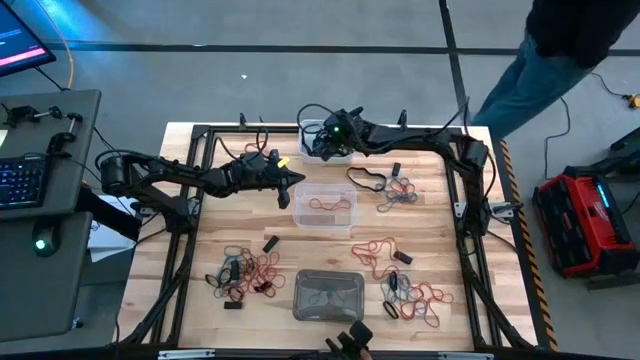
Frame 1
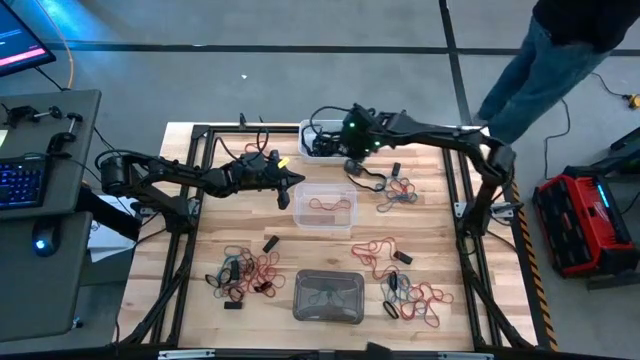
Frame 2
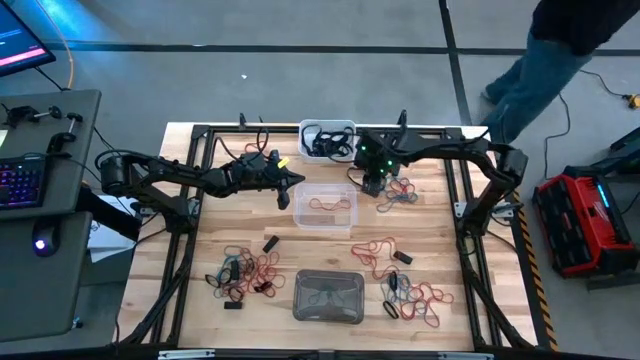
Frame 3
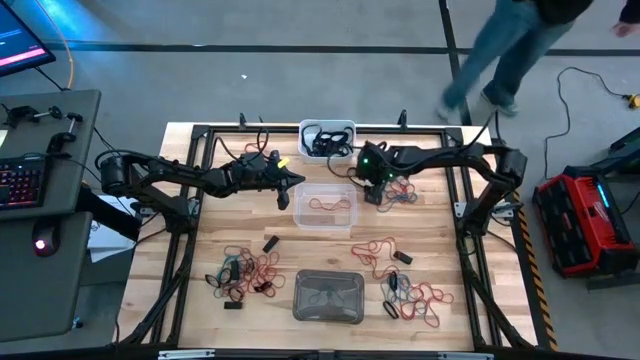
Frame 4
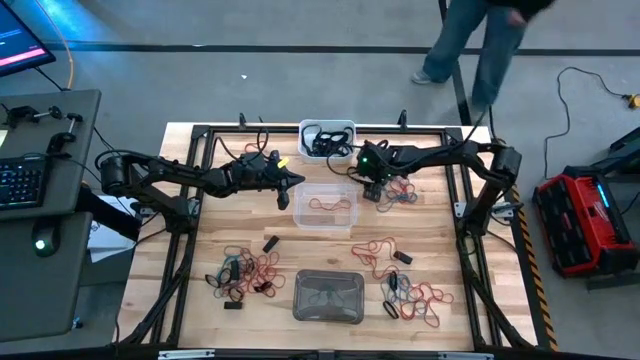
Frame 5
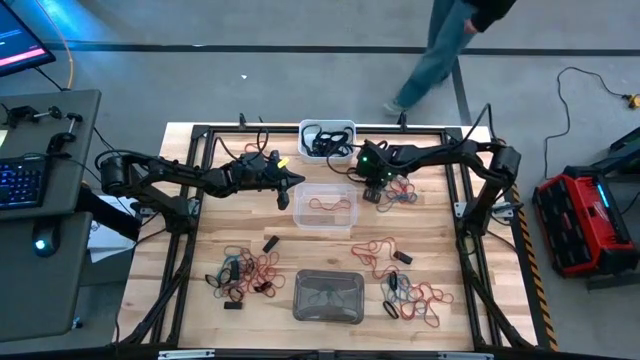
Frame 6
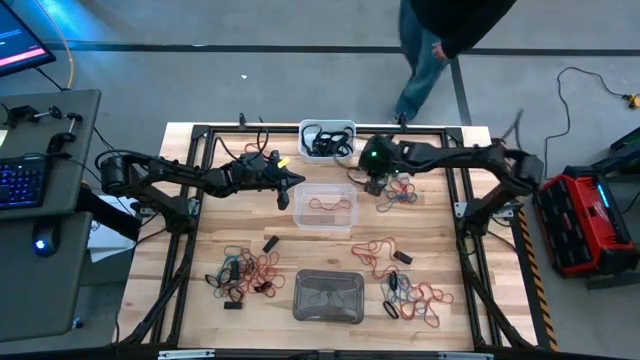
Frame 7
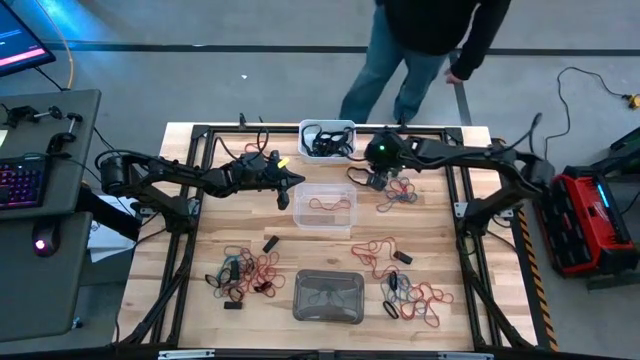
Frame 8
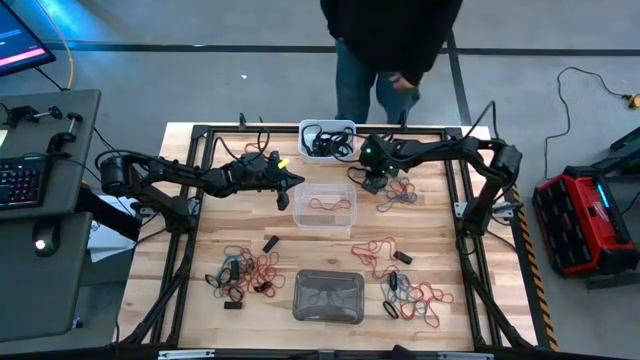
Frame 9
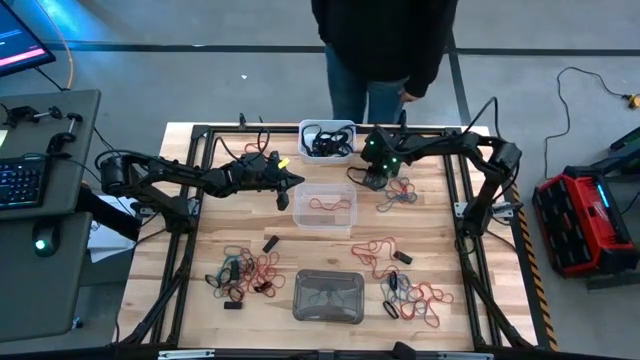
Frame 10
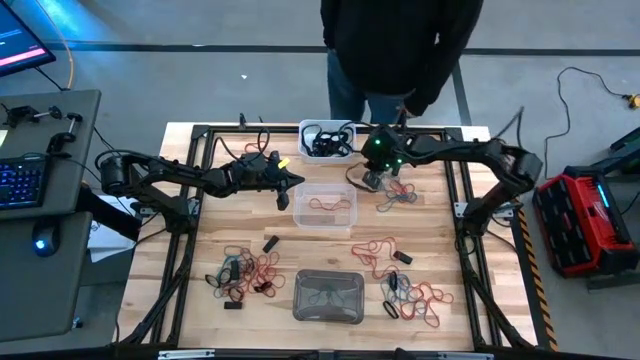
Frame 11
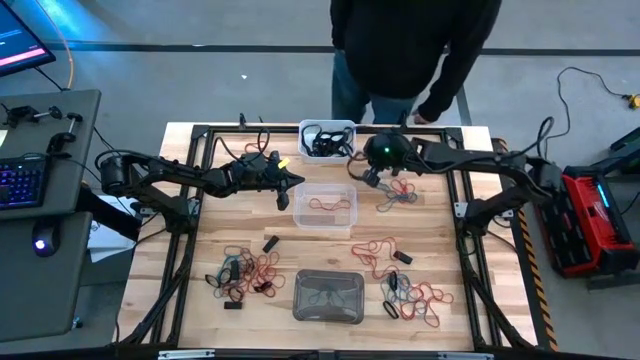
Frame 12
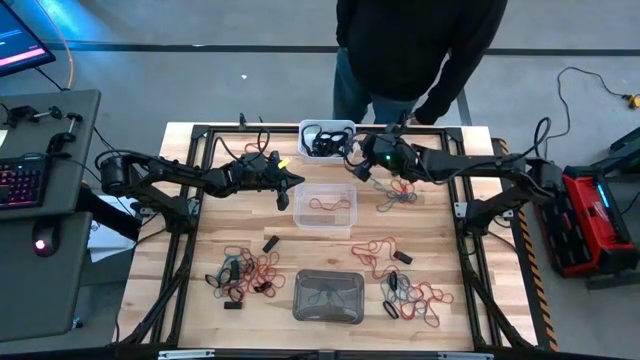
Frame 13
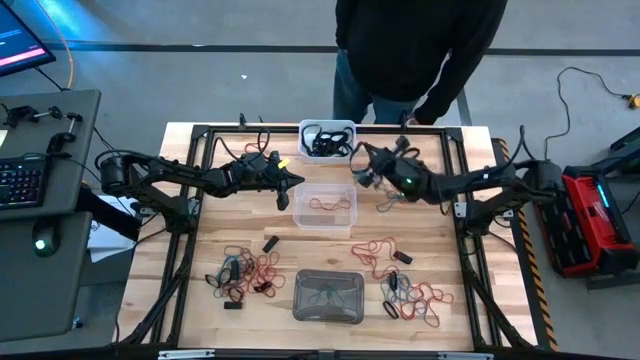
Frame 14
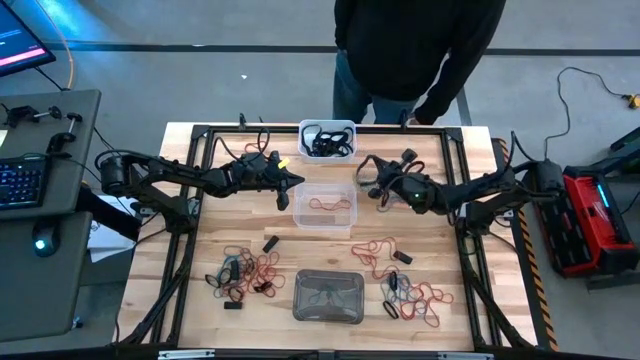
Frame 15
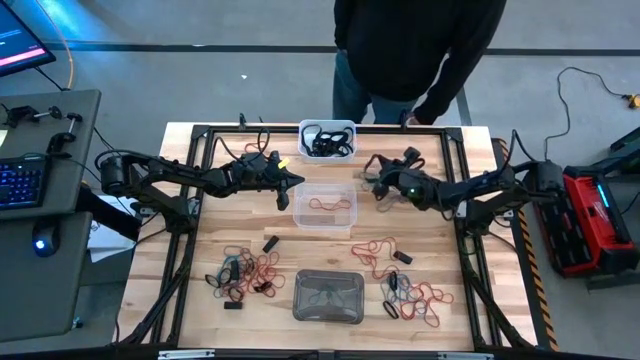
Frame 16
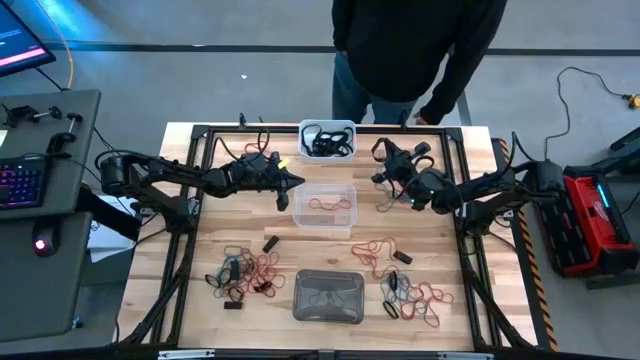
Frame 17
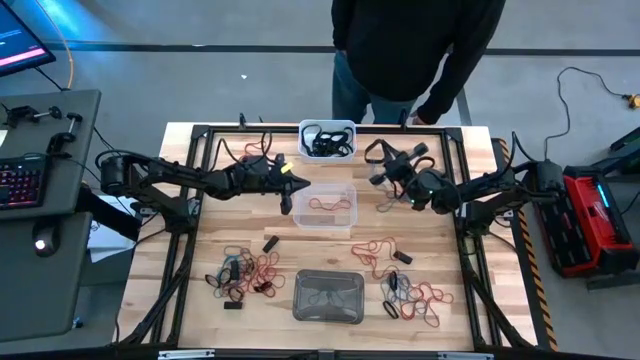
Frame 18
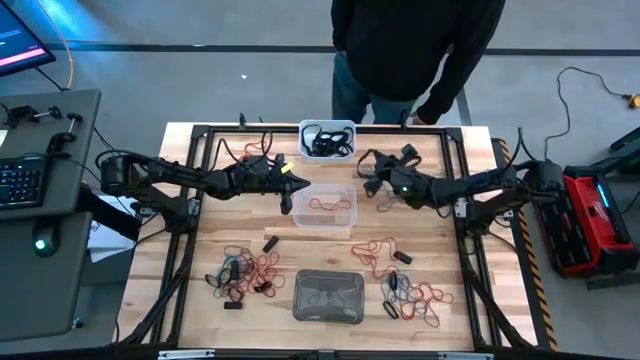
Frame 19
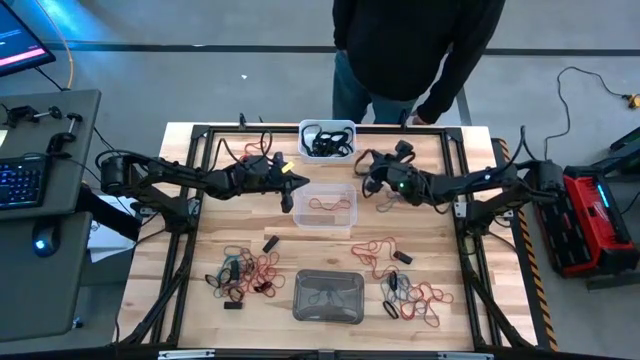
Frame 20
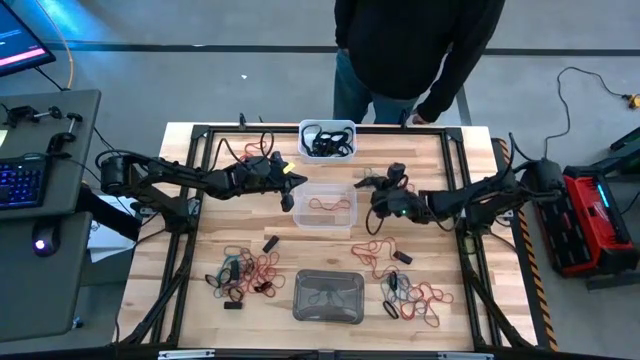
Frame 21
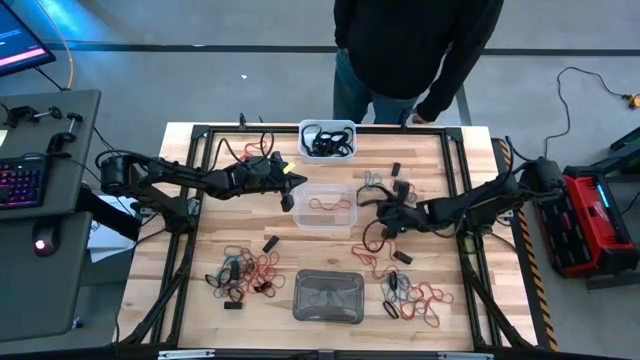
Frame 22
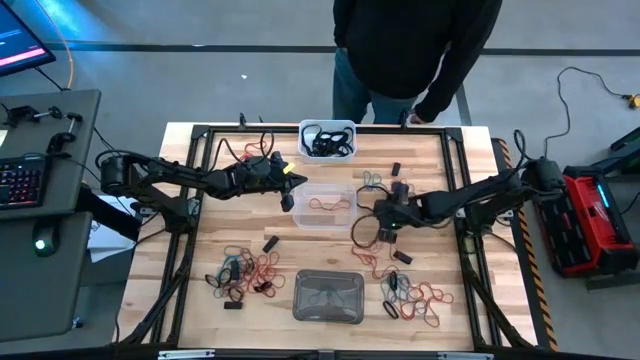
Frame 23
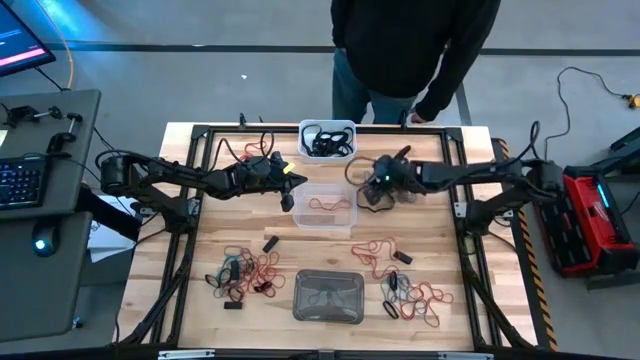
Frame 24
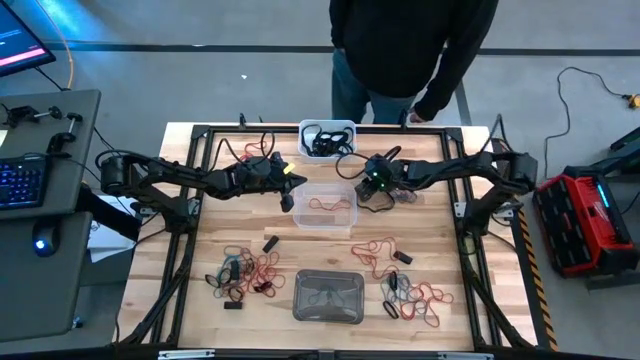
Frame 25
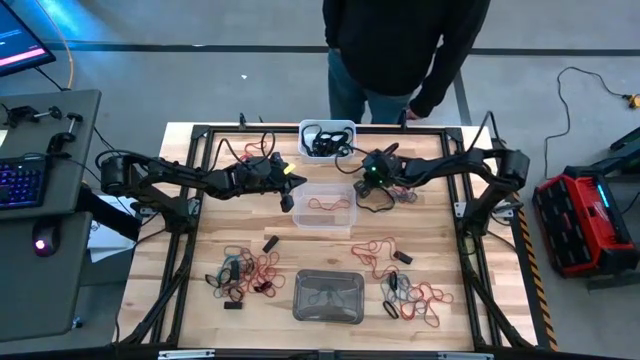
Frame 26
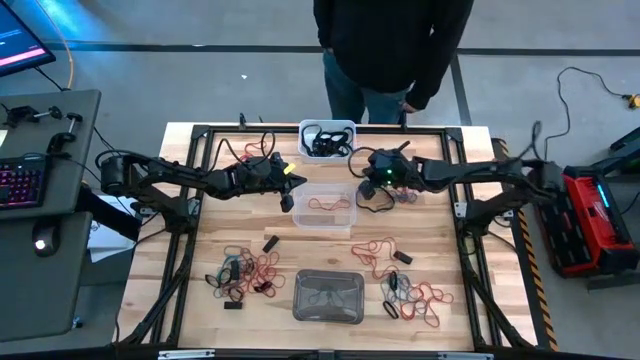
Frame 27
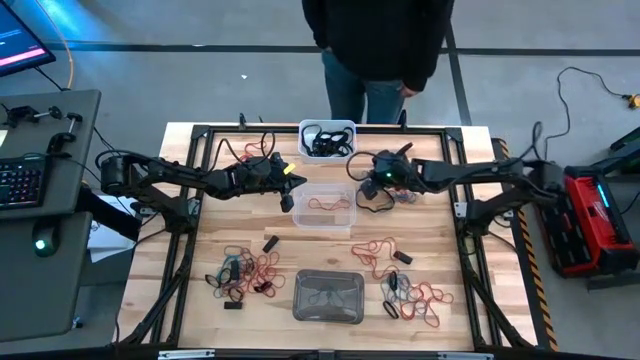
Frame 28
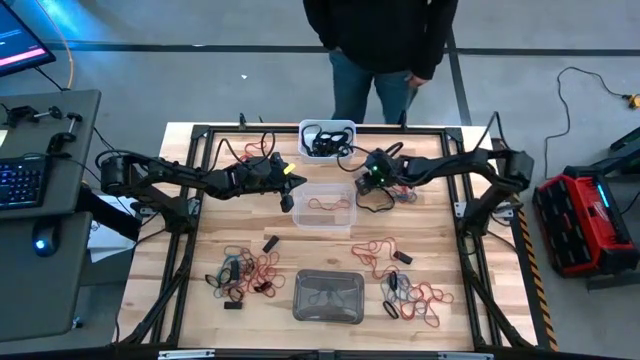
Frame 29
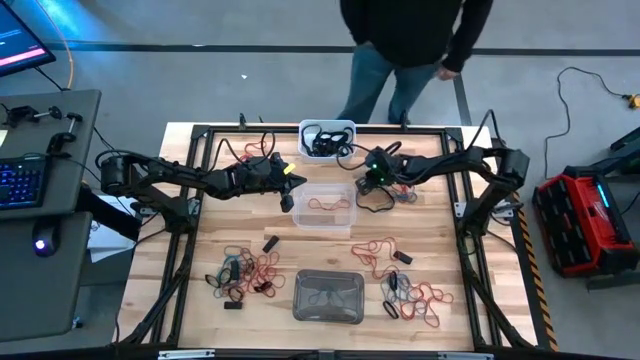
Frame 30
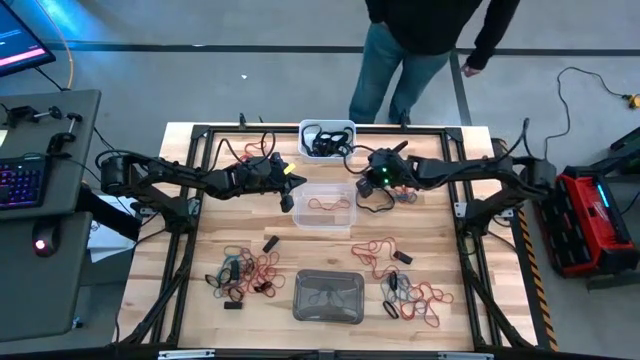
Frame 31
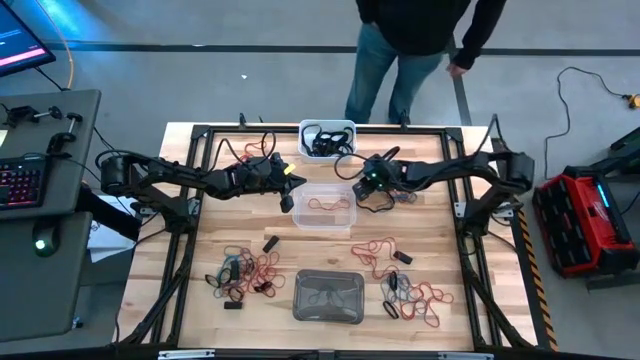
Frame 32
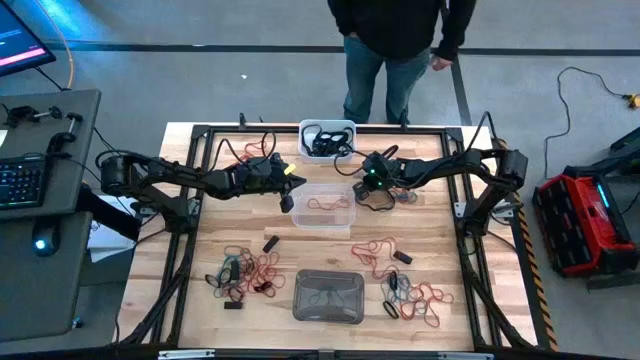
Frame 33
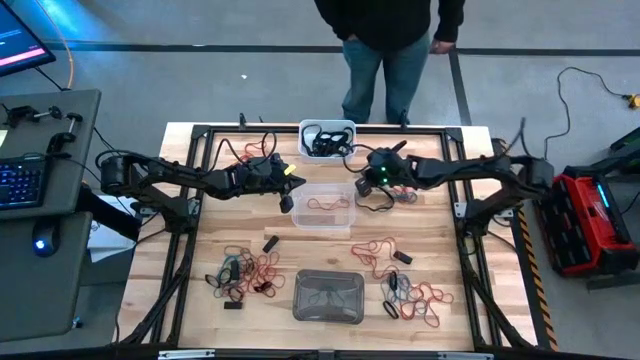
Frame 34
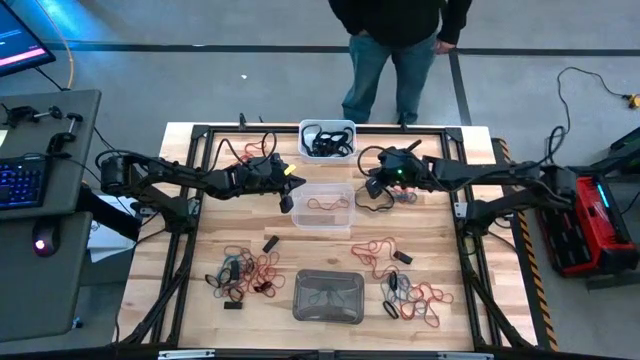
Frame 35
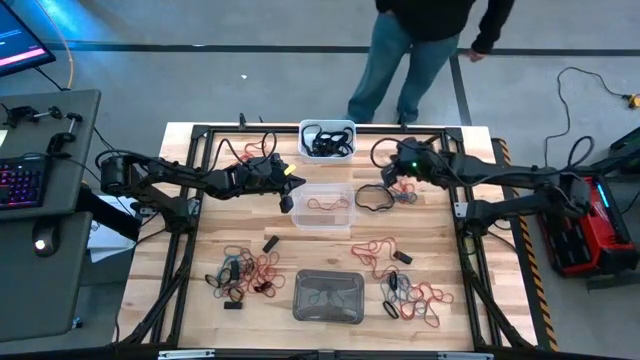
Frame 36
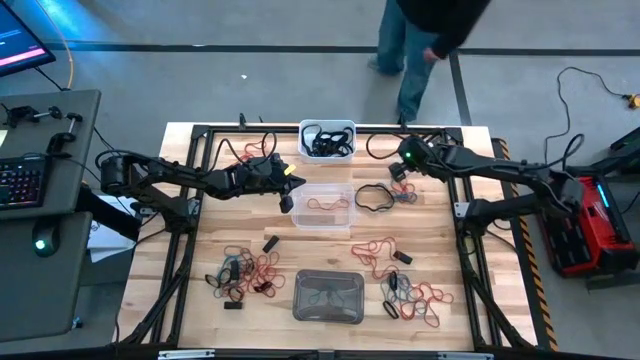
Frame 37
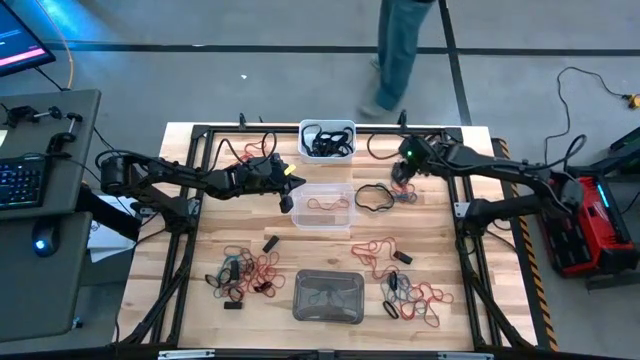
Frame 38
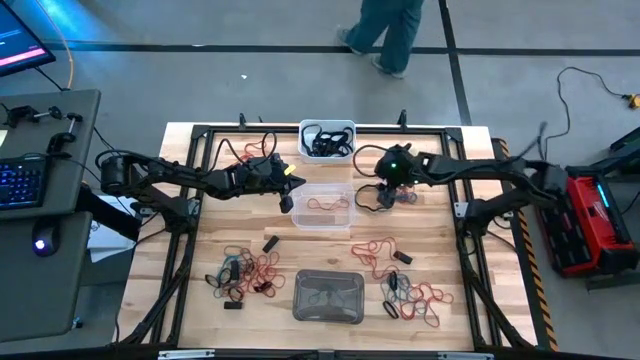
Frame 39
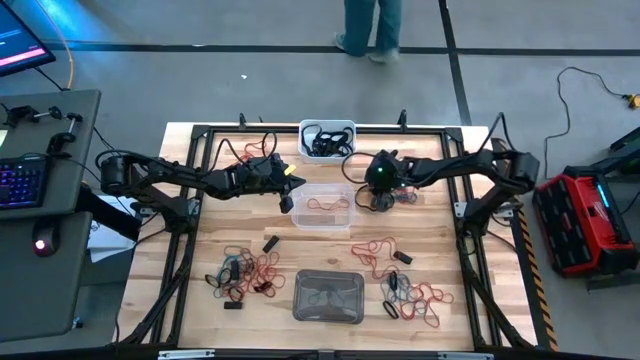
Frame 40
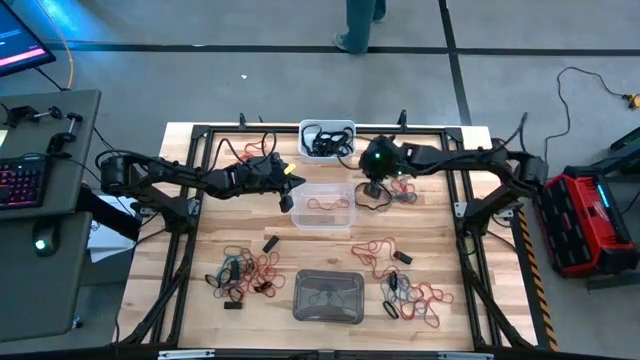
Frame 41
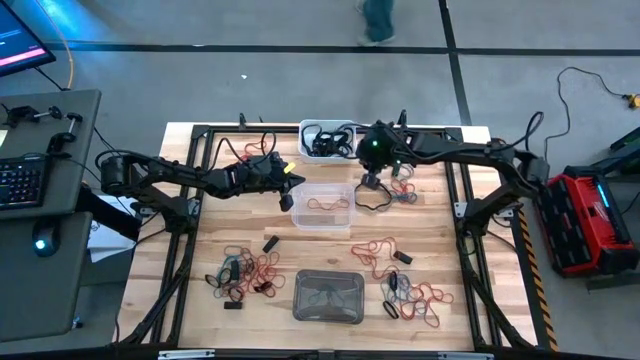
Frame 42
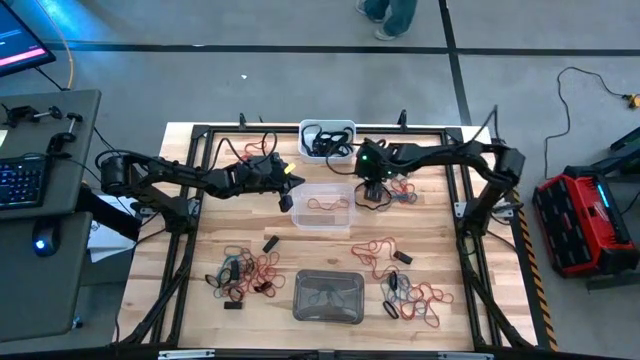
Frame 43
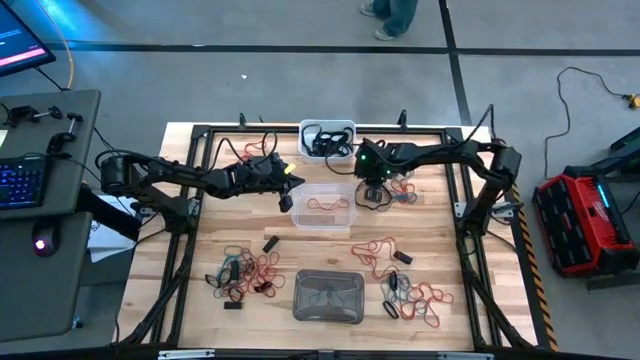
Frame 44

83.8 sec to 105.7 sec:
Task: Sort rubber bands into baskets
Put the black rubber band into the white bin

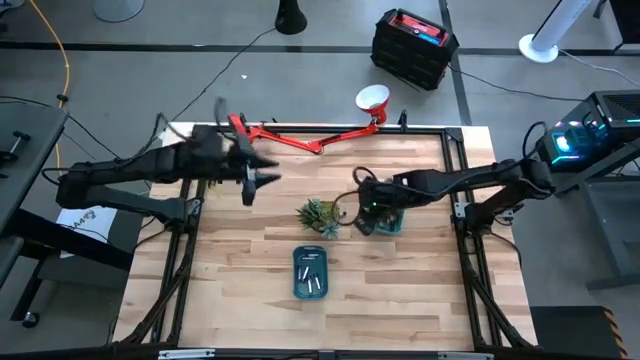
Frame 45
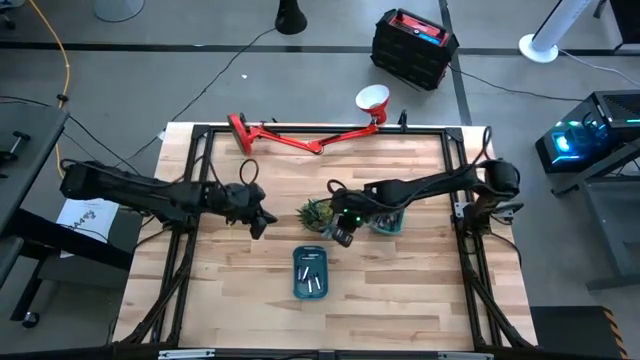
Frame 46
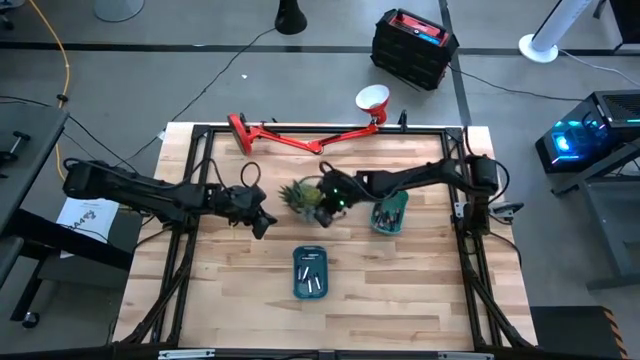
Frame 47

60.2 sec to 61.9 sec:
Task: Sort batteries
Move the black vase plant to the top of the table
